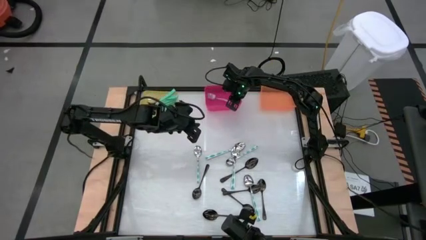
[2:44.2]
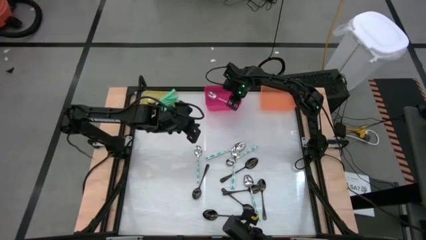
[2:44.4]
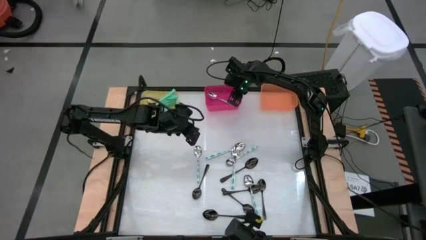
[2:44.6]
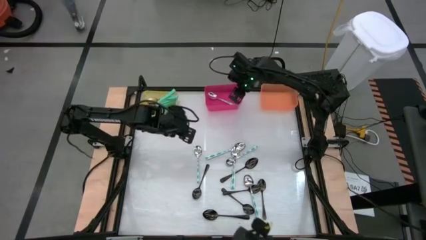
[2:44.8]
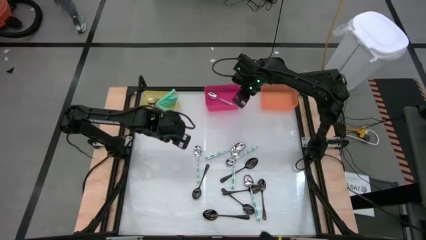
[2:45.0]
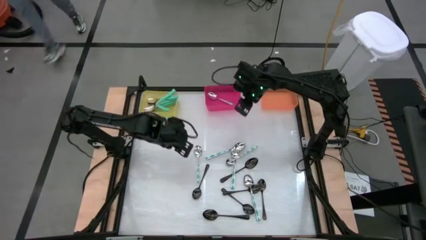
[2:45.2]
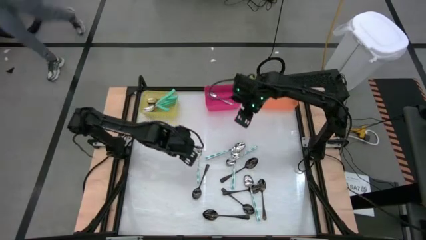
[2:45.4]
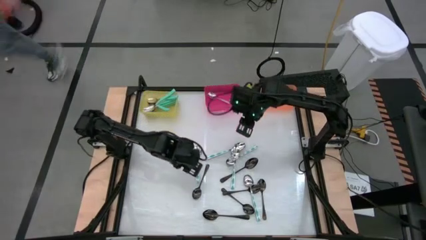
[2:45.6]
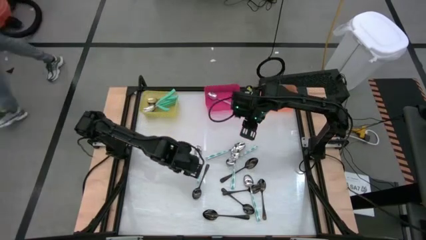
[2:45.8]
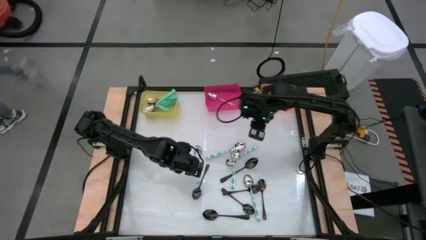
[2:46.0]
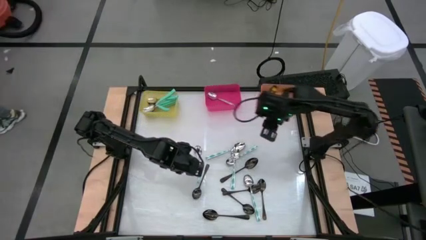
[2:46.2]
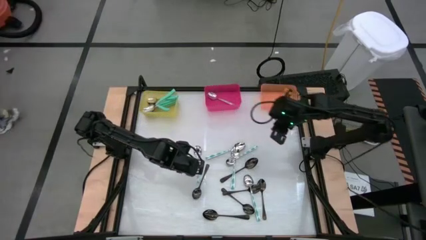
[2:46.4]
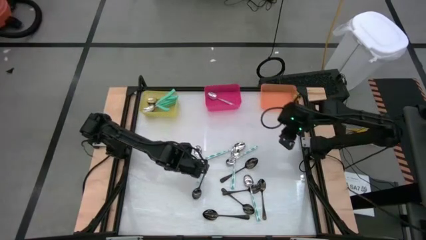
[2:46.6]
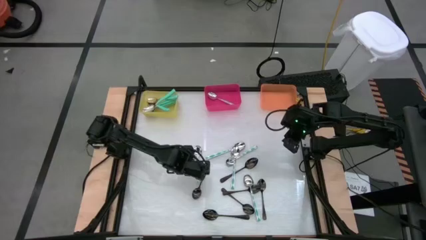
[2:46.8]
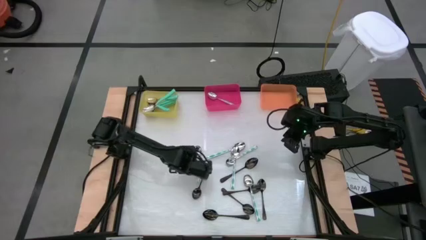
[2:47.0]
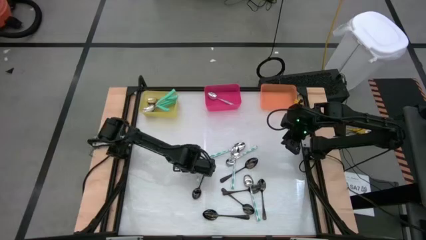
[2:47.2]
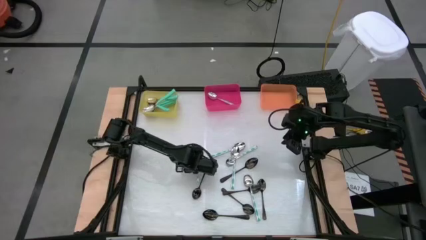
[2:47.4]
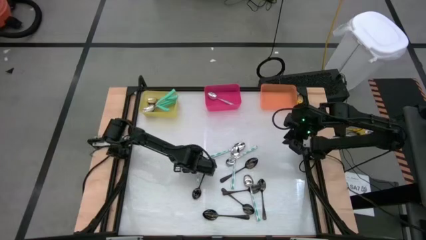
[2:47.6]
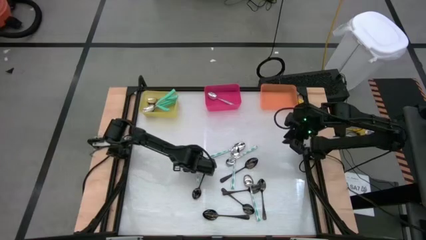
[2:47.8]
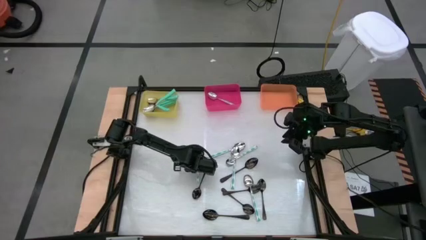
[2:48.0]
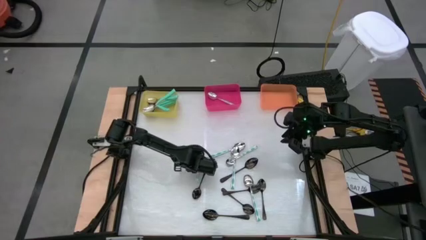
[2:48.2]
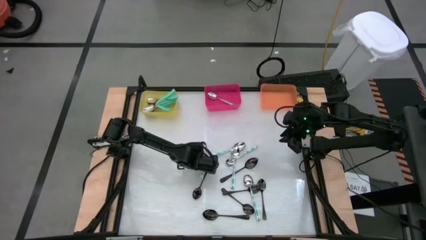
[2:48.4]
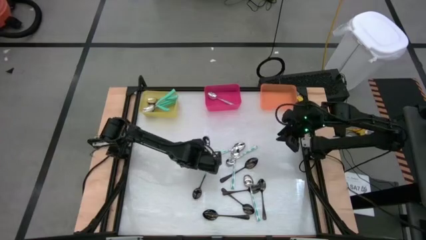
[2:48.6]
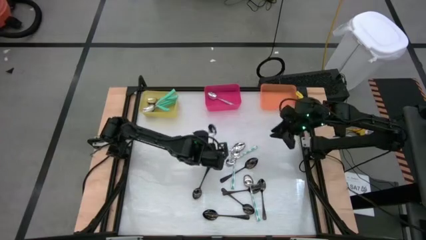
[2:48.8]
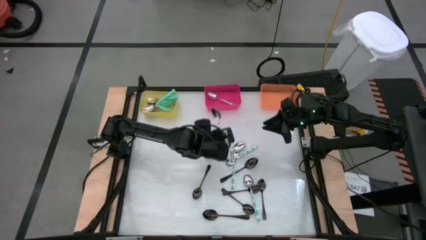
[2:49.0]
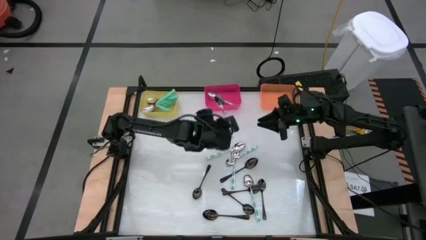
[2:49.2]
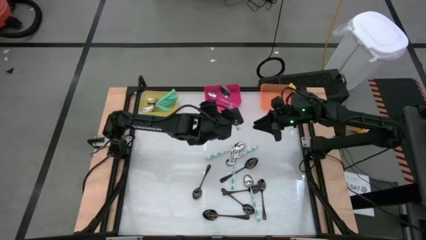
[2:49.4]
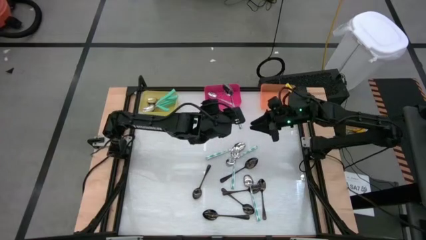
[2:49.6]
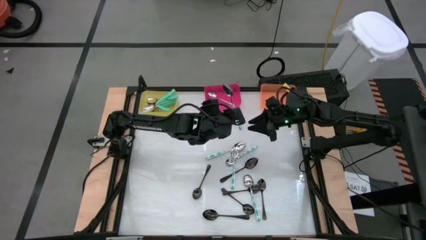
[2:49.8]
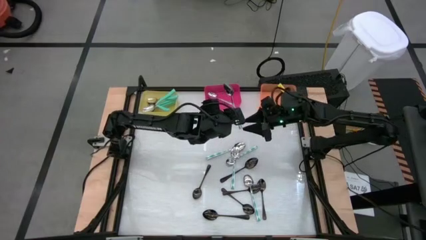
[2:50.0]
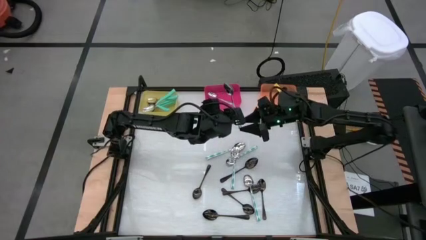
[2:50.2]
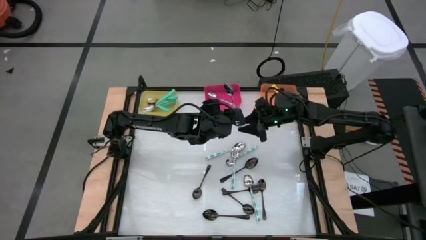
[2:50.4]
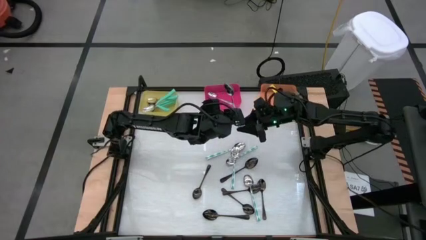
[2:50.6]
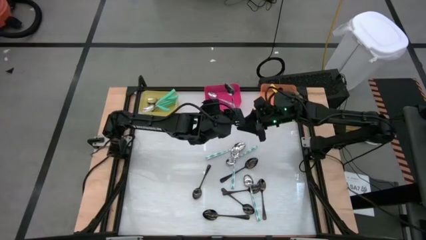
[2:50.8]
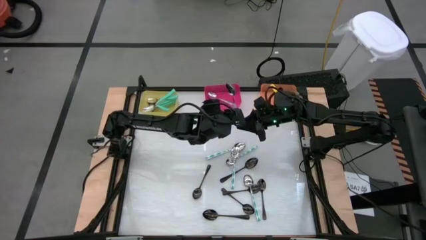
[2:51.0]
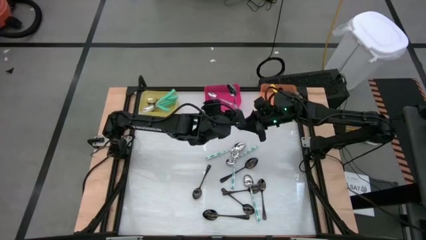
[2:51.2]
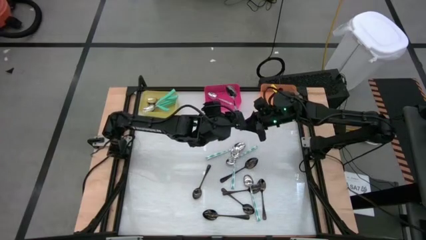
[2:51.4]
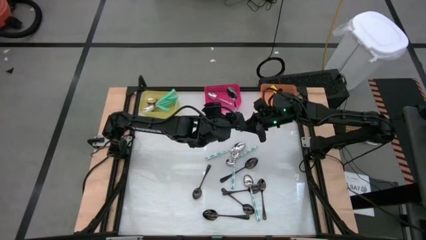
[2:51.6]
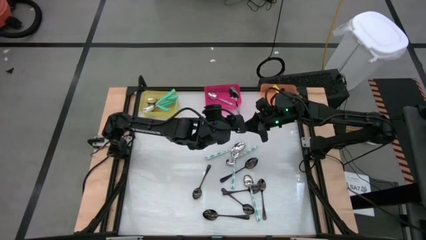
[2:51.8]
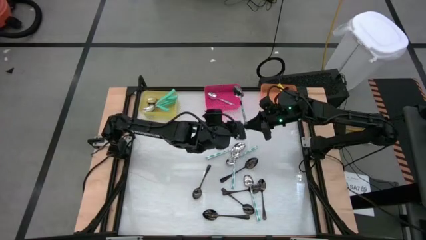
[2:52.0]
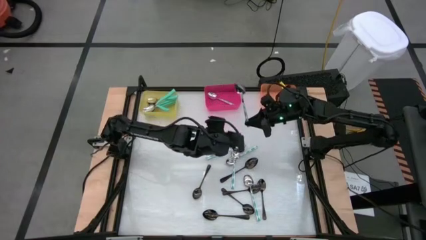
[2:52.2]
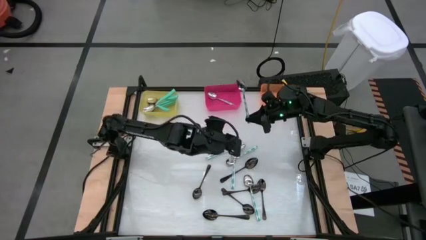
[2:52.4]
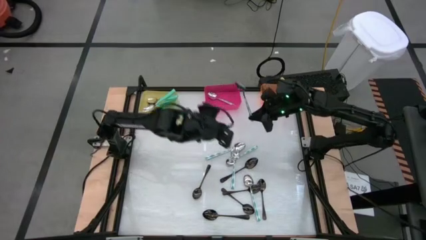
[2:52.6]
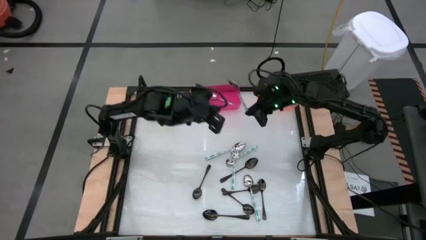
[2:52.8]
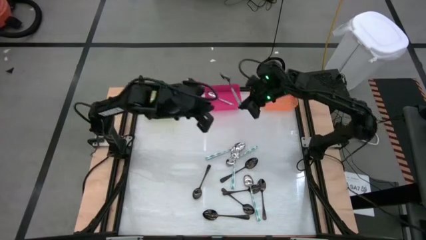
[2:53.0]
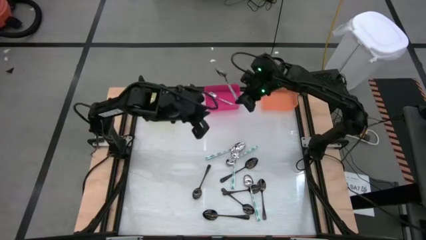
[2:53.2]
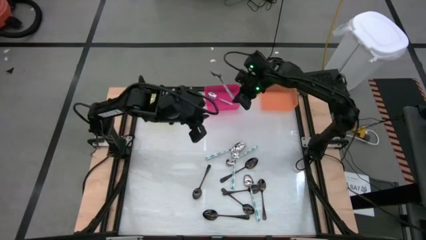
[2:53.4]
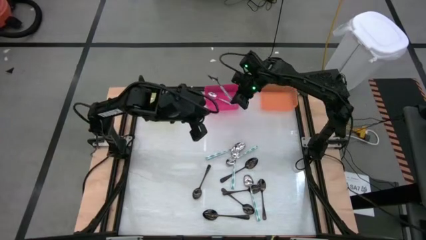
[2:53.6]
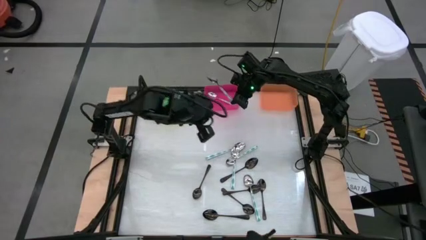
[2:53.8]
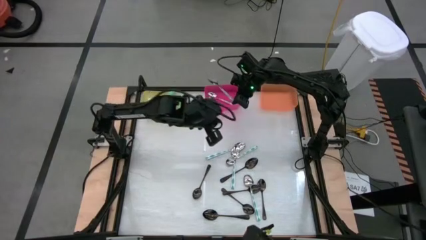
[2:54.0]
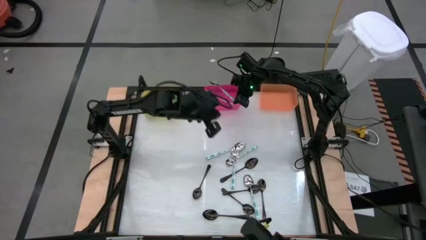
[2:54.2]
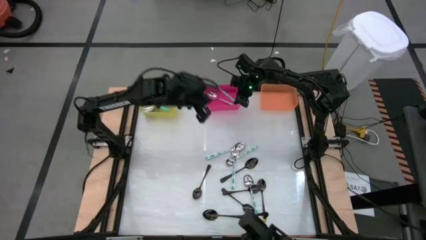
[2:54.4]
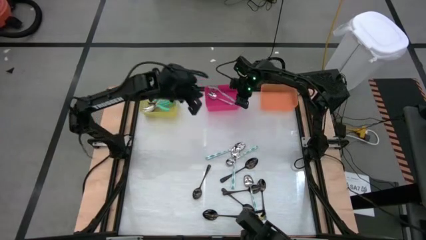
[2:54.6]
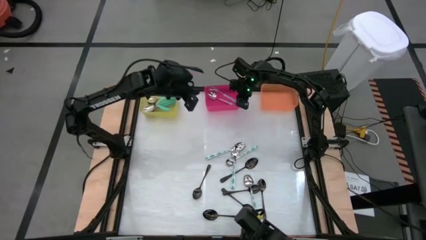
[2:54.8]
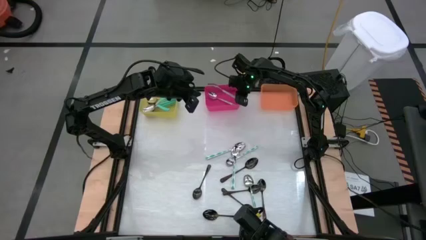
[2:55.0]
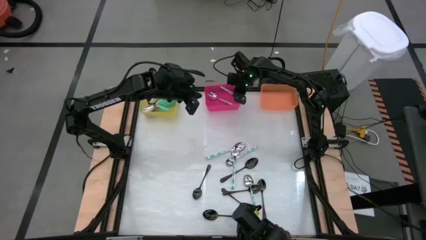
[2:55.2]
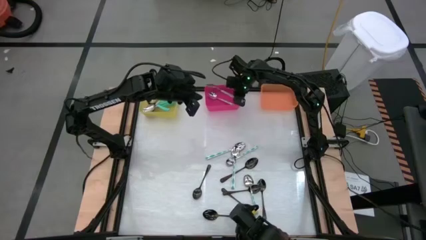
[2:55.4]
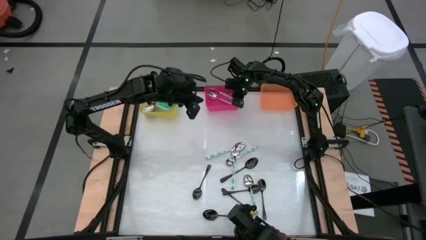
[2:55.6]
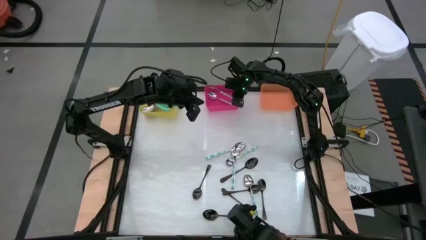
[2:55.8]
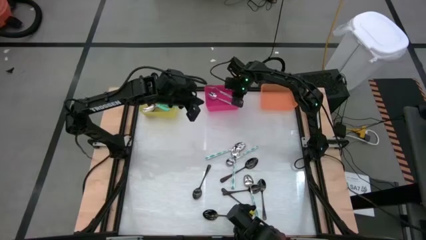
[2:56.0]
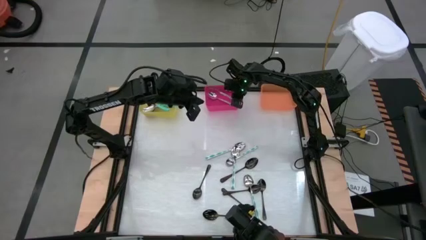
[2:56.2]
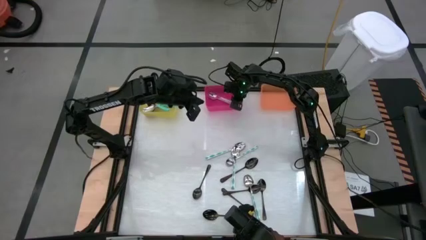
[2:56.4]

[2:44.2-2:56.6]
Task: Sort silverware by color (type)
Put the white patterned spoon into the pink bin
